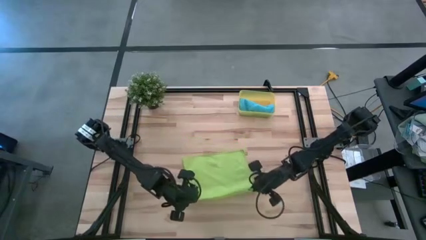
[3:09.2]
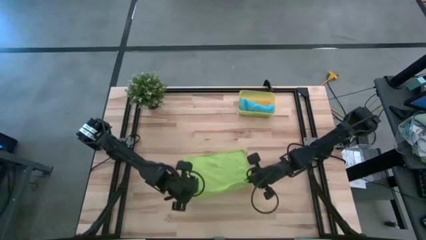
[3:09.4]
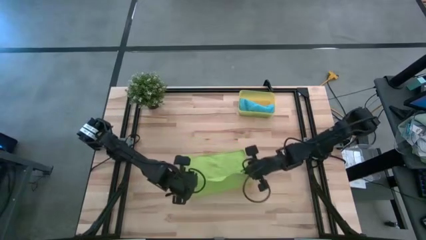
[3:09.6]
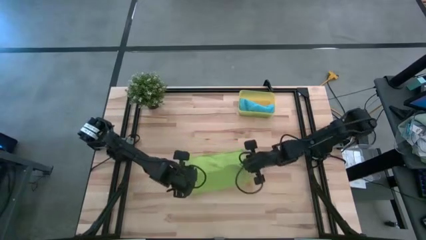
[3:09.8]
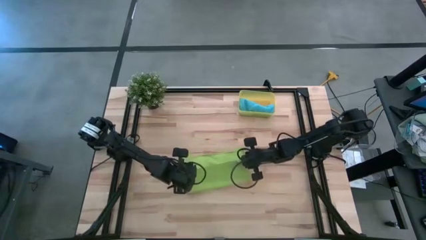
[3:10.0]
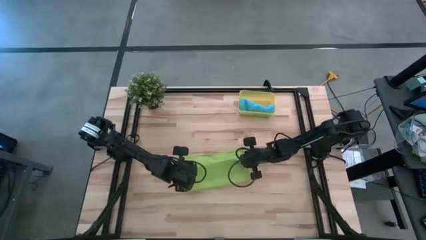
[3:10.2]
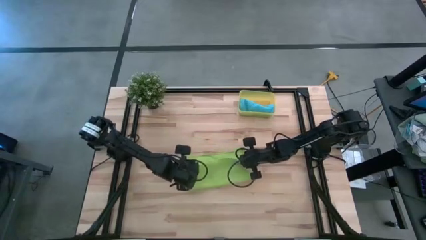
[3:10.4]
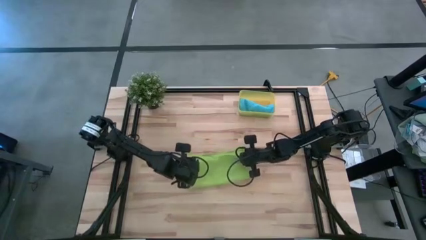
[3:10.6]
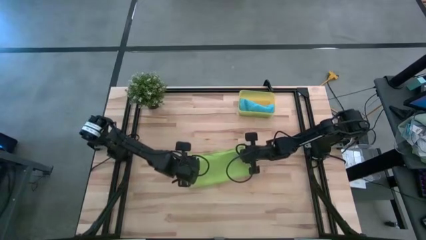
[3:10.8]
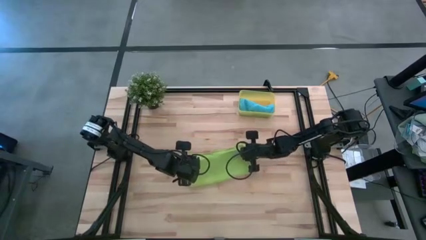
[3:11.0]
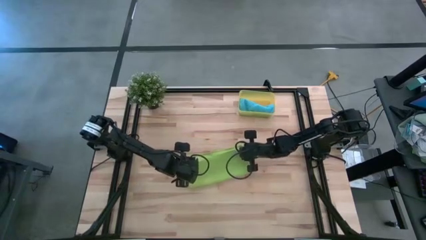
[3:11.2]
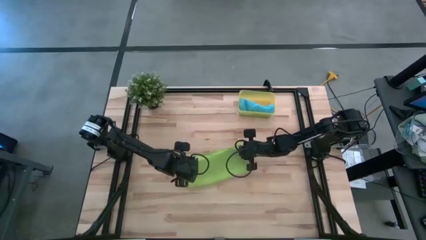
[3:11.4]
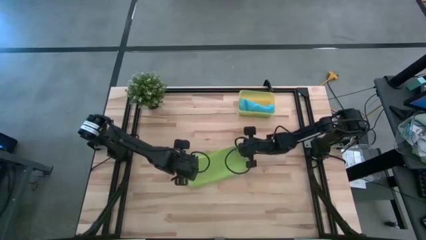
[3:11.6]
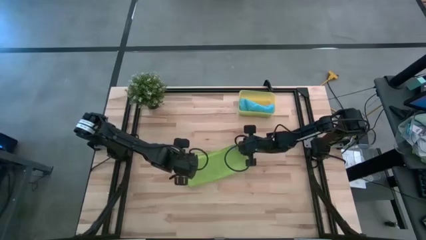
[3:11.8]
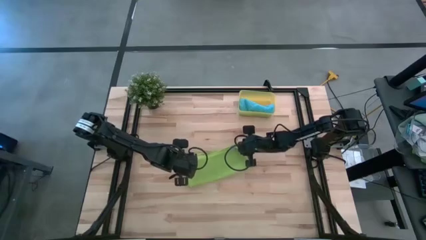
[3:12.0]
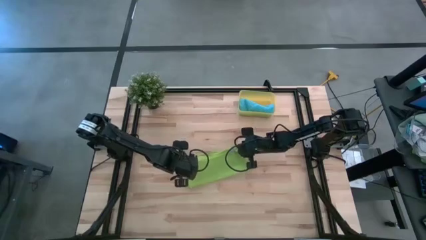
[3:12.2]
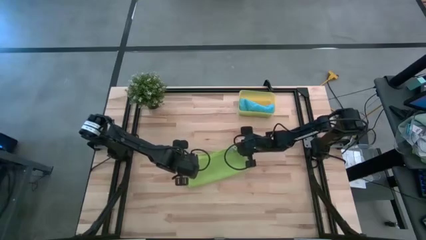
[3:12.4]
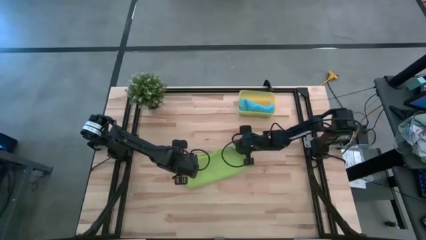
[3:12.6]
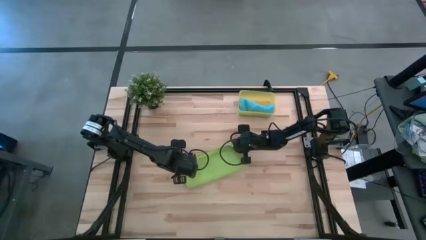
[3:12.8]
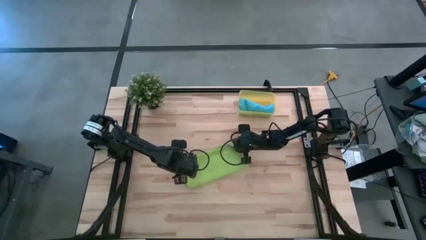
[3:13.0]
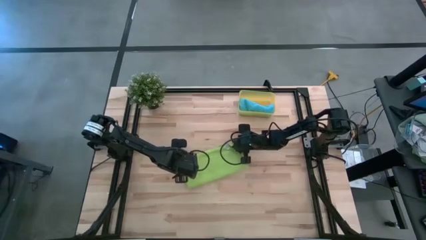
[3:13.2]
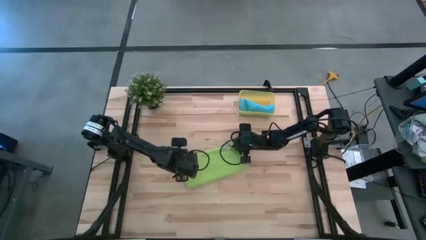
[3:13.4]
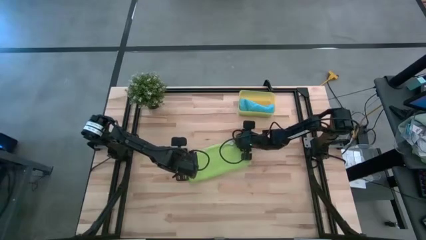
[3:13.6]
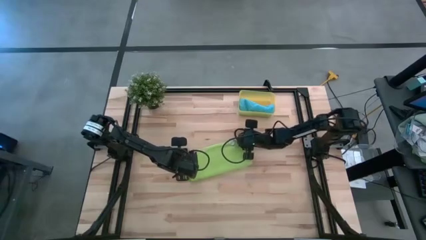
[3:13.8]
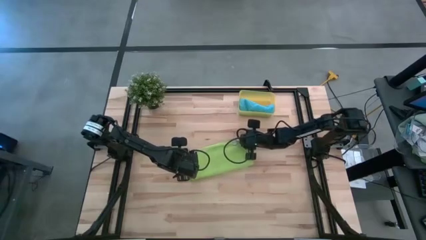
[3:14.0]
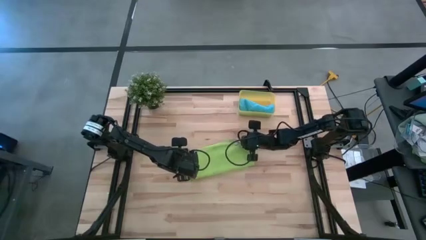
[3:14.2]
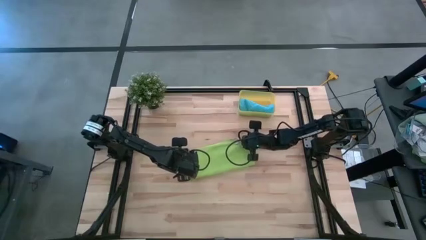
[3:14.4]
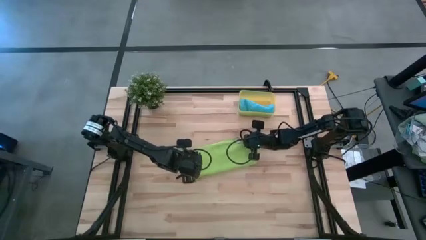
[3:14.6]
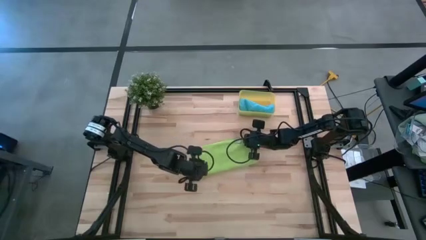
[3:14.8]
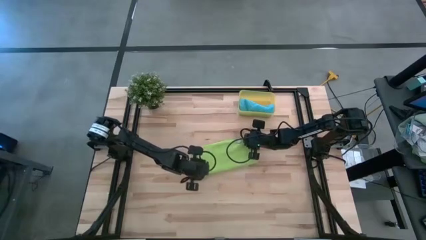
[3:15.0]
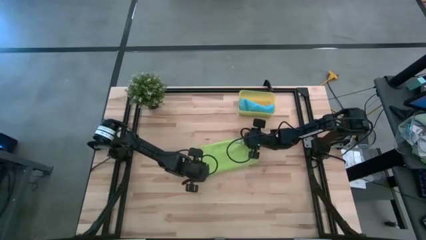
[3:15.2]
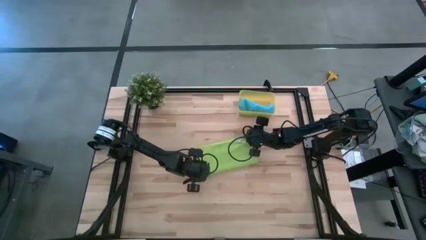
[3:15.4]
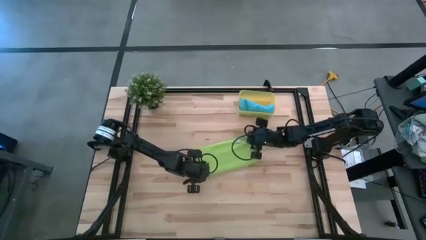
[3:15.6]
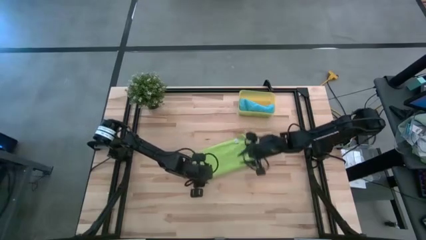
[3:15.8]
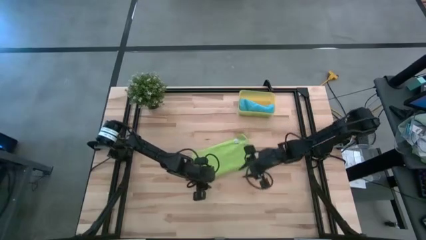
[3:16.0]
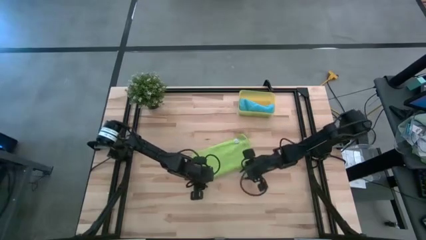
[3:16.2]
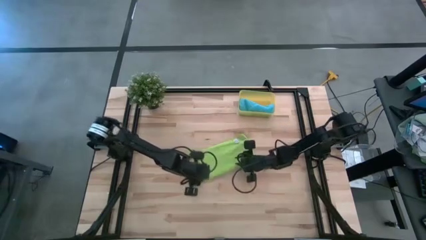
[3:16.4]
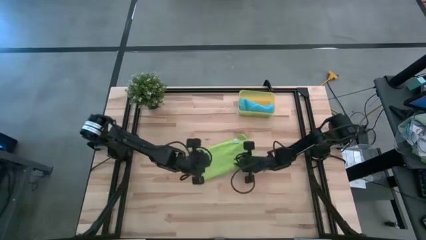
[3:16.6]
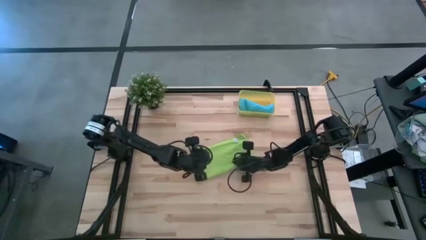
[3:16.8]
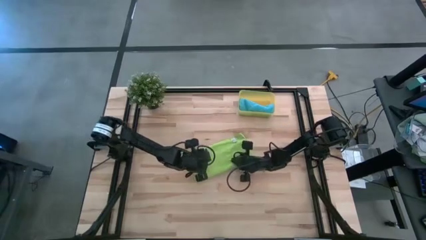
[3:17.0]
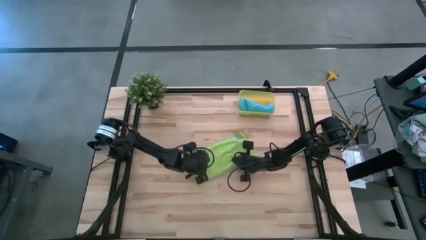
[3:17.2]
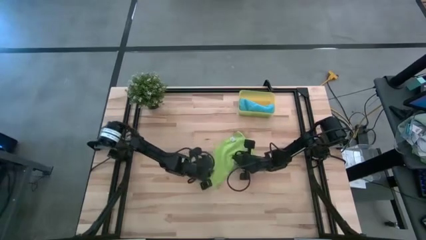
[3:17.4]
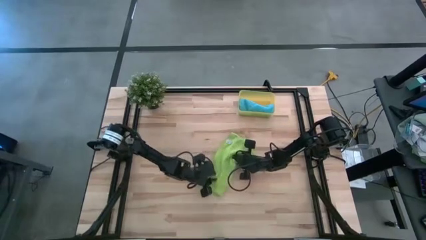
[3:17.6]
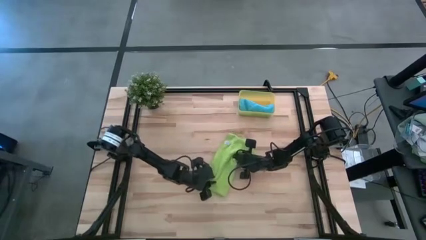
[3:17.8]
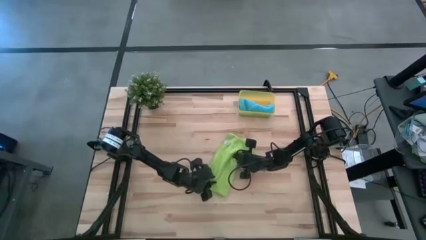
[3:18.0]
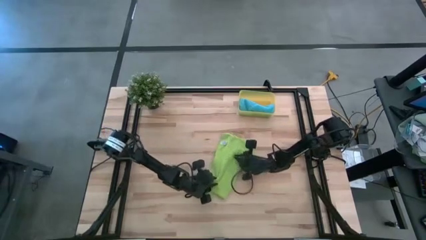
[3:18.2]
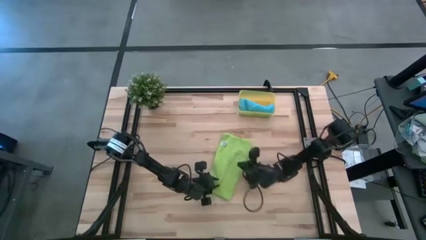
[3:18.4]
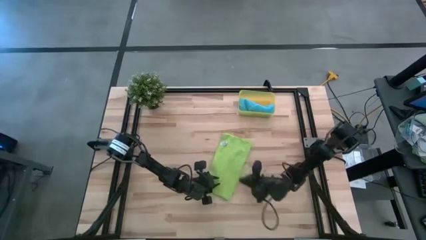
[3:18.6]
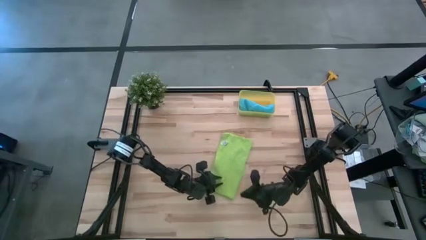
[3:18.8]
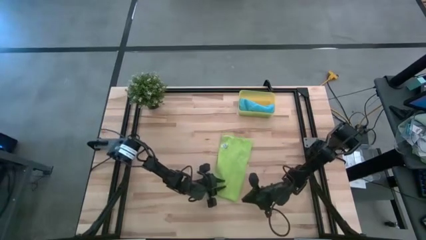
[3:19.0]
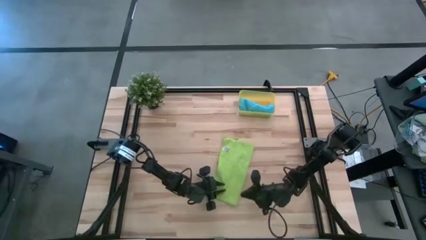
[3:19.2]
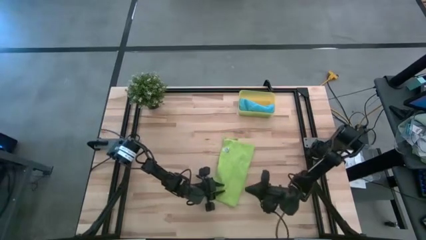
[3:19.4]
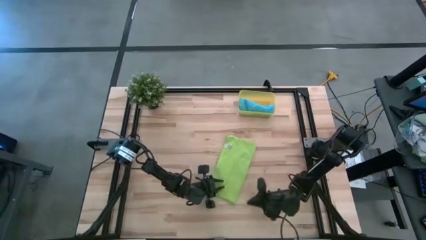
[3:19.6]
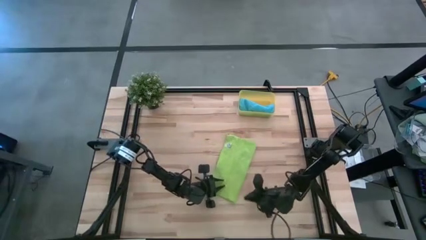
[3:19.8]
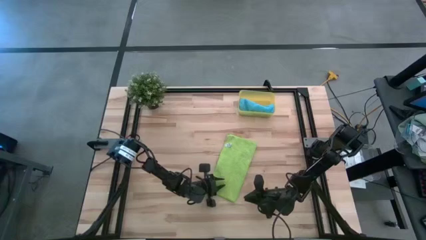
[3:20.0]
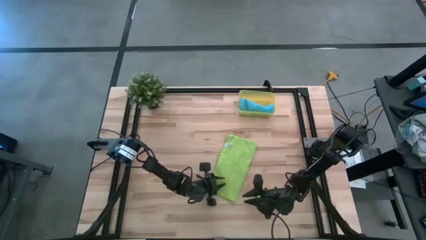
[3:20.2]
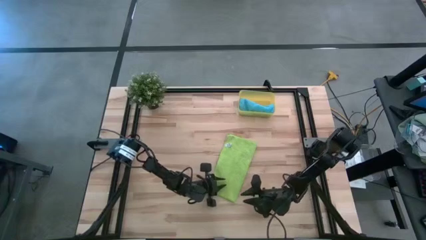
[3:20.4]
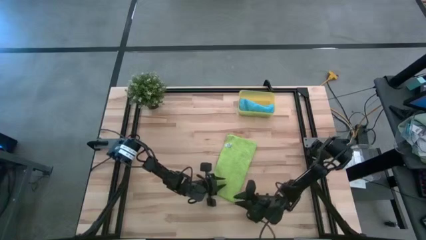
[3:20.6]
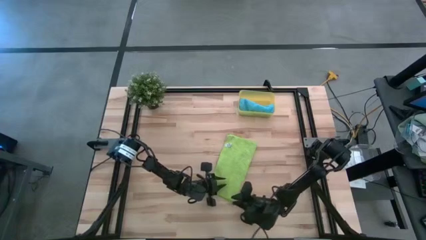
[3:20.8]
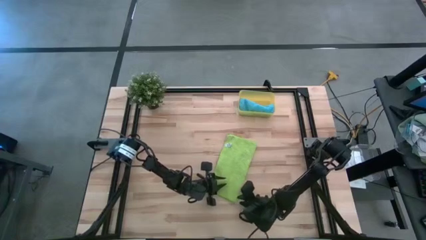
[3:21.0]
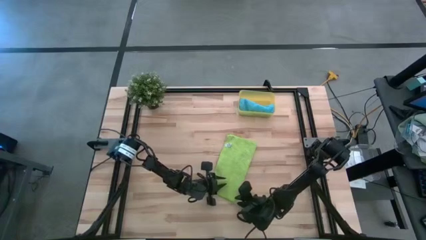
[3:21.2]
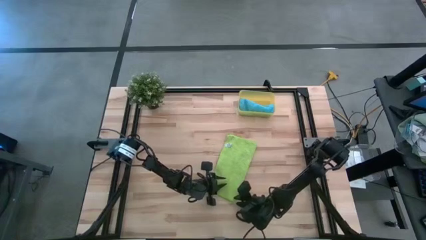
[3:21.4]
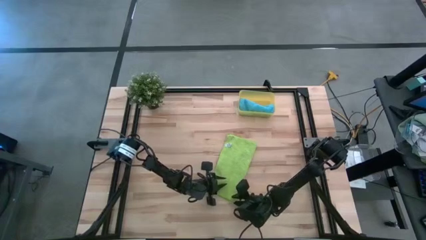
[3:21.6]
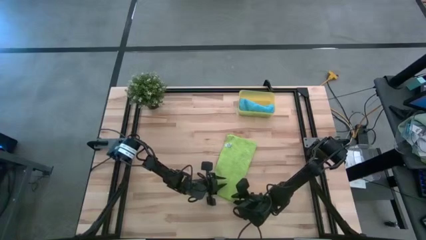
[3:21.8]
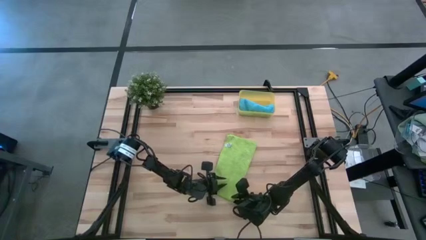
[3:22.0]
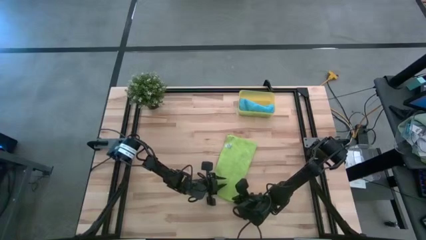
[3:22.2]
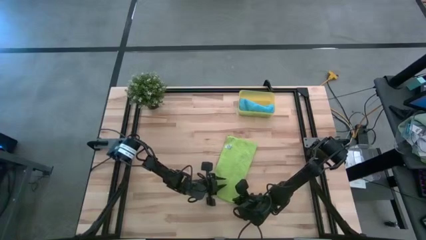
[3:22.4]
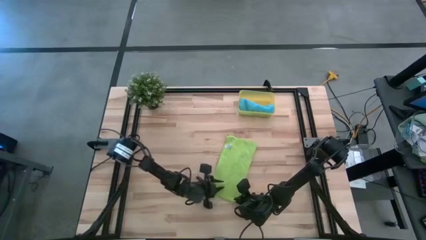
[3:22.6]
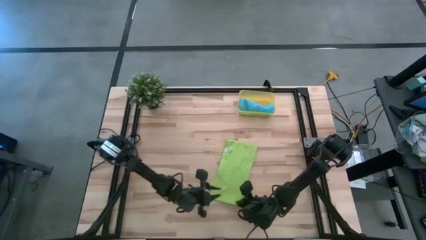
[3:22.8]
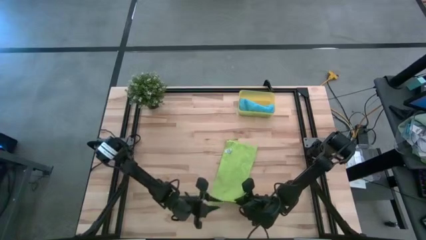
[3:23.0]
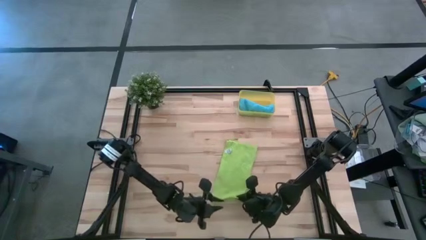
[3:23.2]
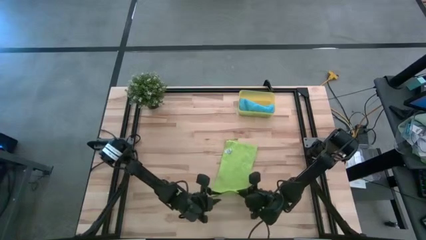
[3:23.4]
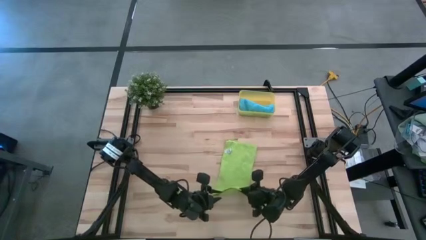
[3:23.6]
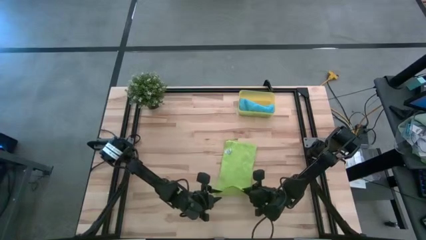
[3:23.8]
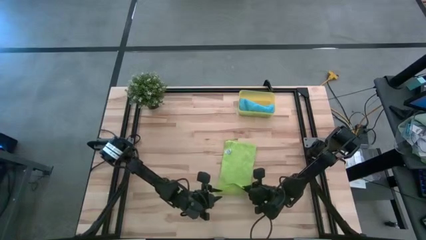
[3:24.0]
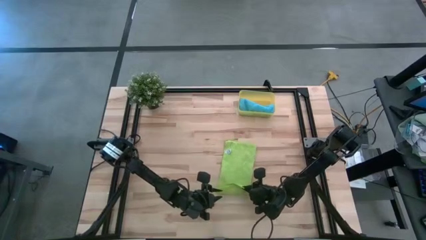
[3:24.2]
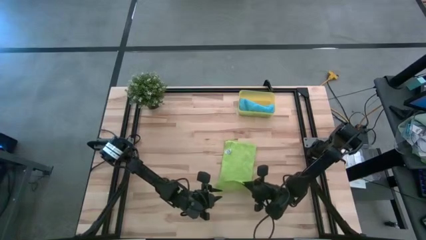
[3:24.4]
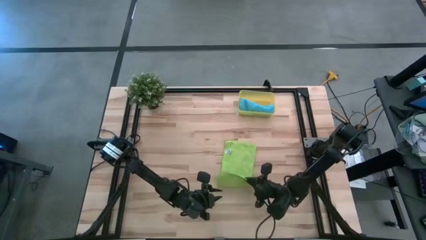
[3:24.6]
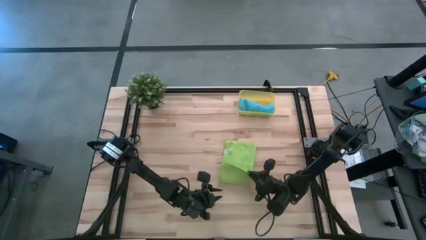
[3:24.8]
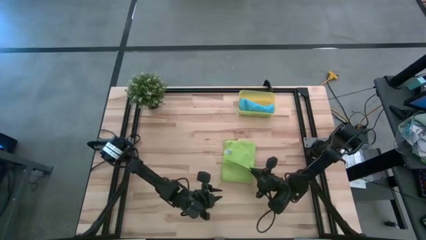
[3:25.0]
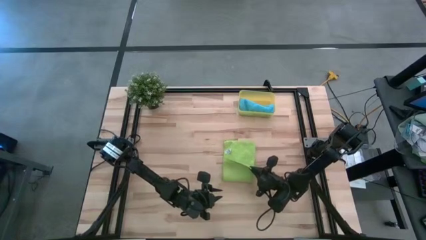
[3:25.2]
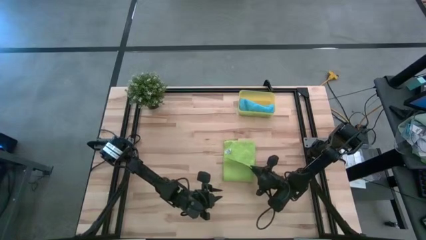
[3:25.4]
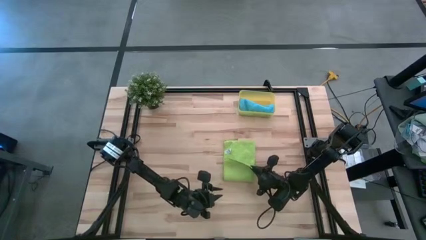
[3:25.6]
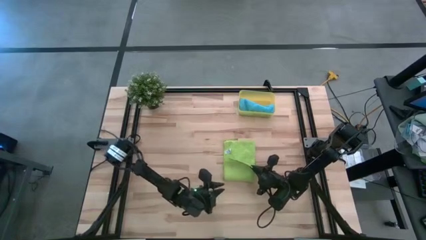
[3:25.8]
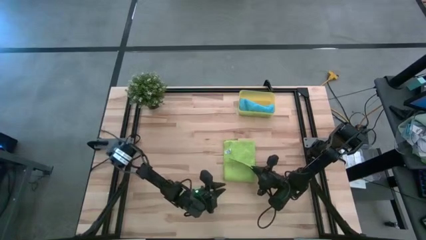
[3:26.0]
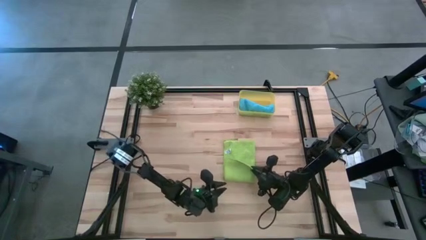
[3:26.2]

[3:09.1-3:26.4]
Task: Roll microfiber towels into tight, uniform cylinder then place into a basket
Fold the green microfiber towel
